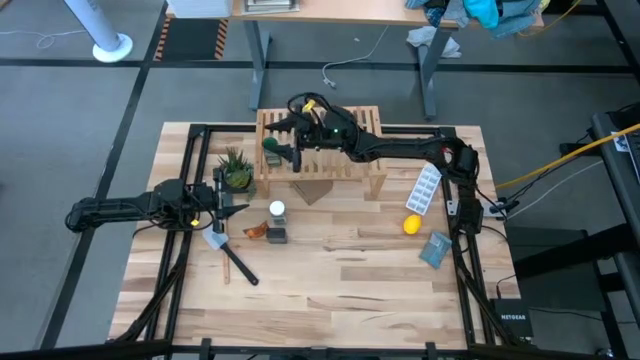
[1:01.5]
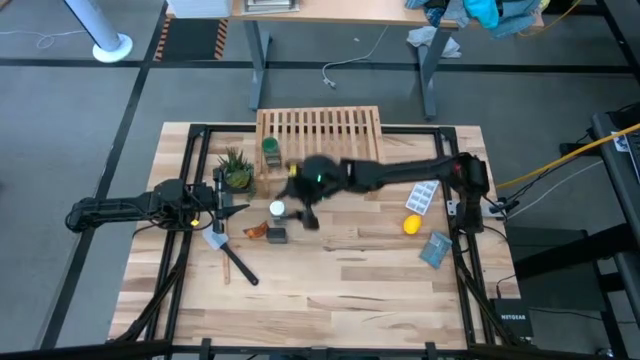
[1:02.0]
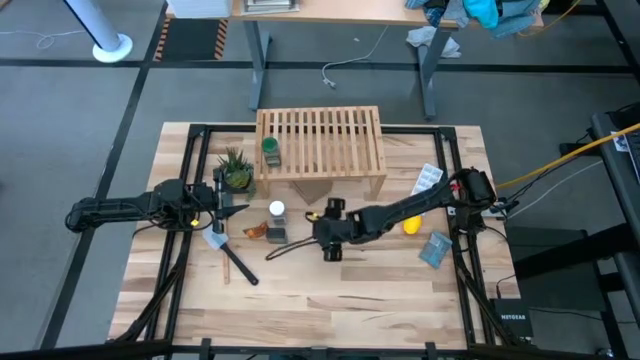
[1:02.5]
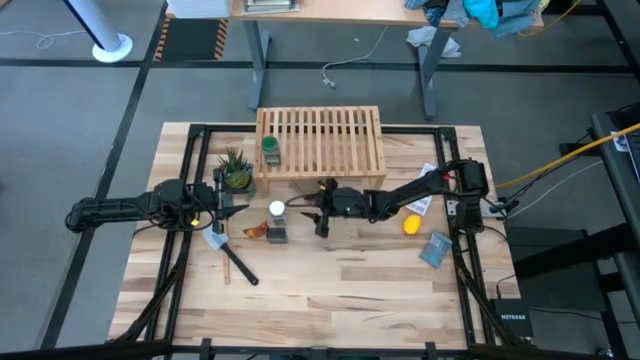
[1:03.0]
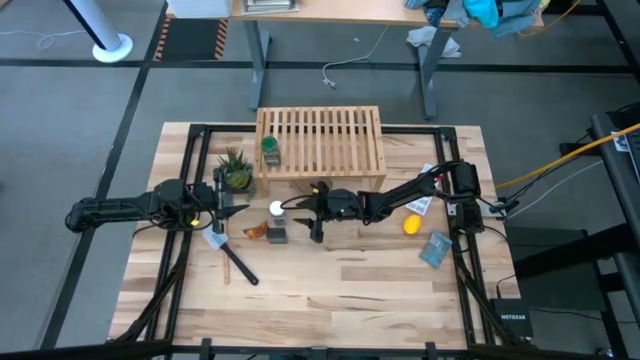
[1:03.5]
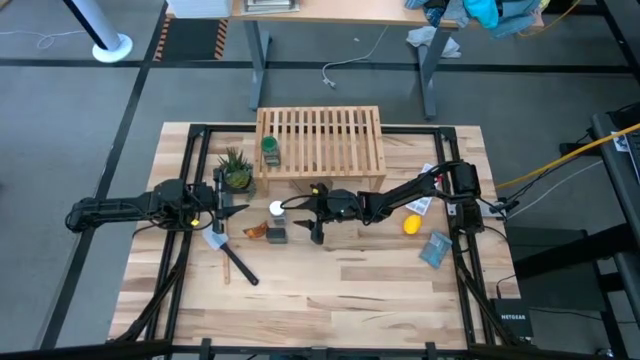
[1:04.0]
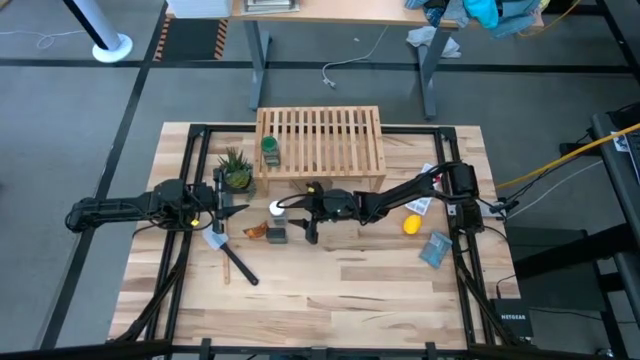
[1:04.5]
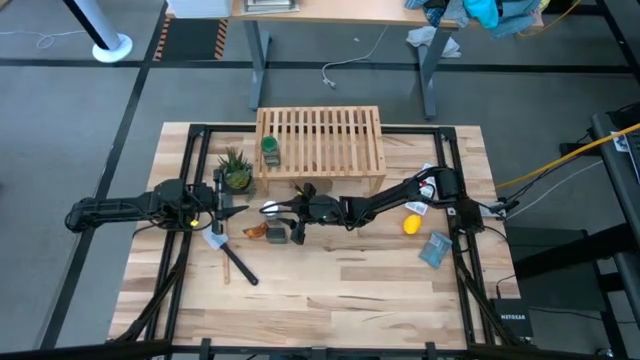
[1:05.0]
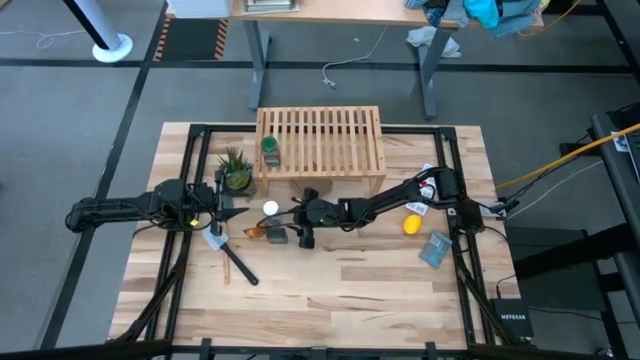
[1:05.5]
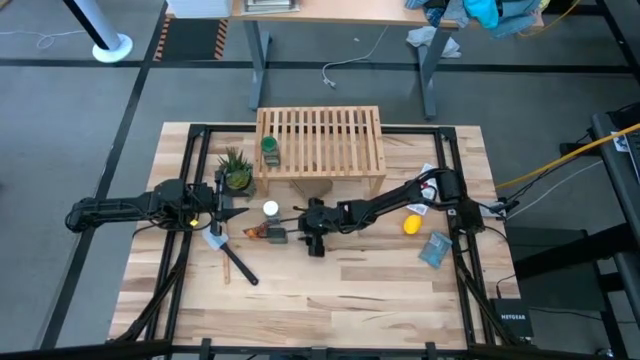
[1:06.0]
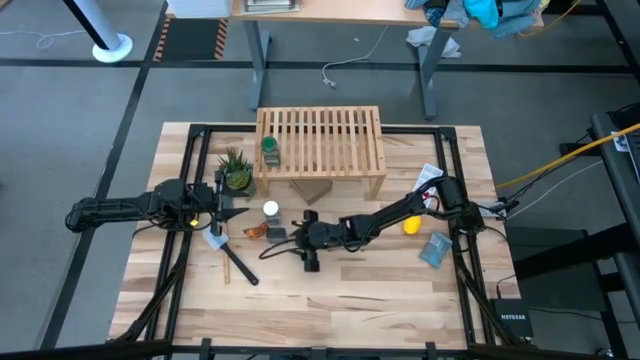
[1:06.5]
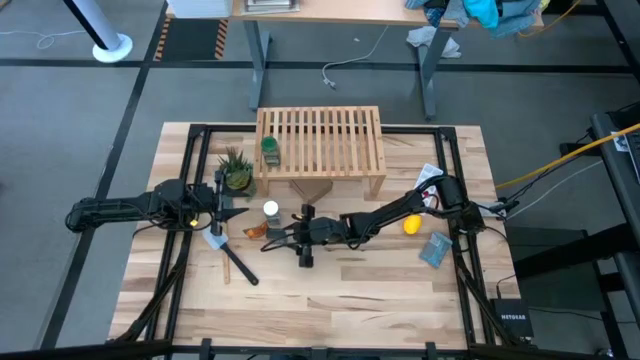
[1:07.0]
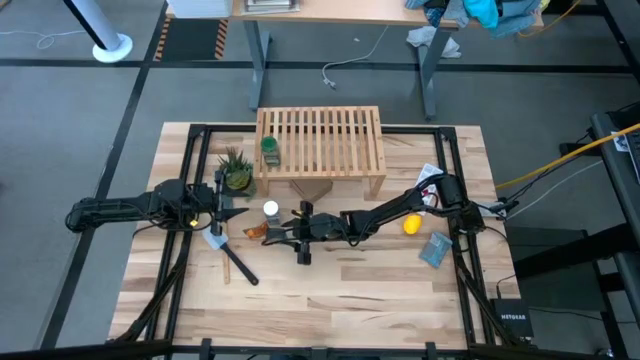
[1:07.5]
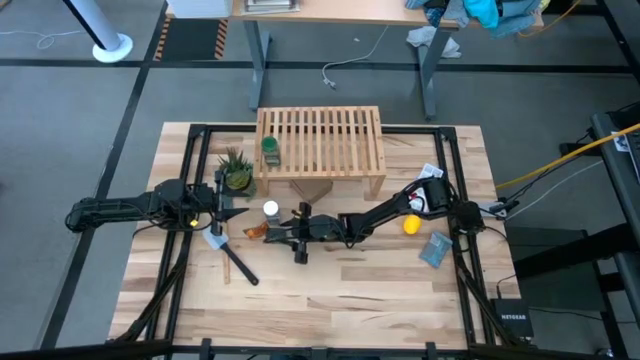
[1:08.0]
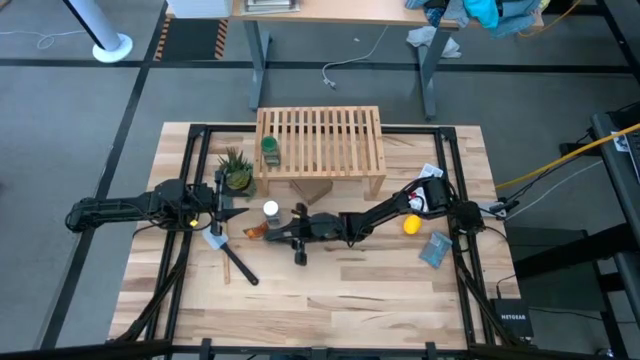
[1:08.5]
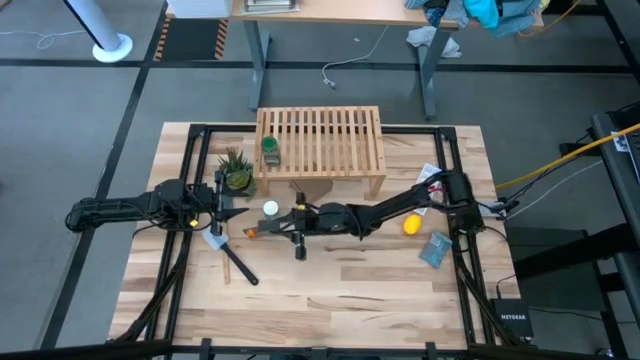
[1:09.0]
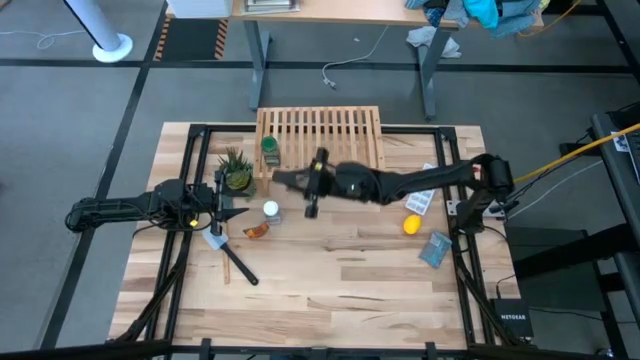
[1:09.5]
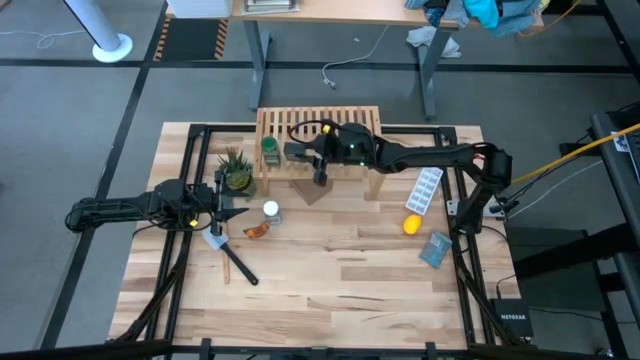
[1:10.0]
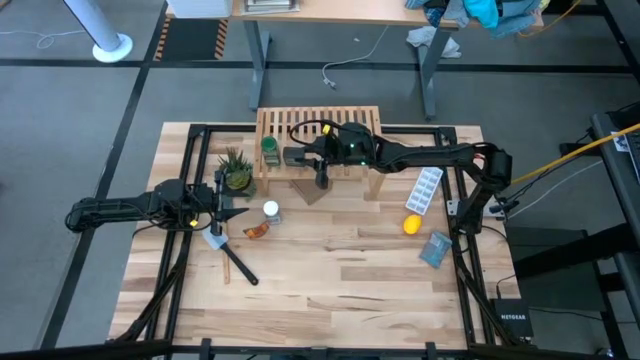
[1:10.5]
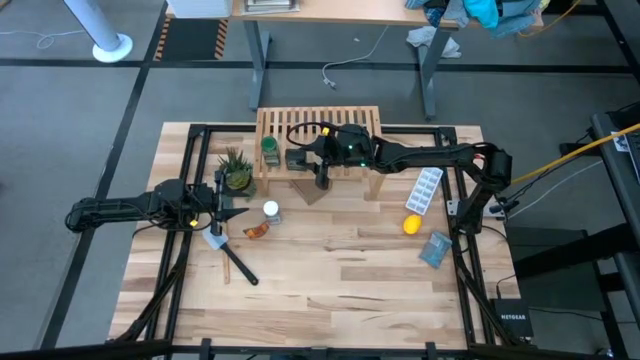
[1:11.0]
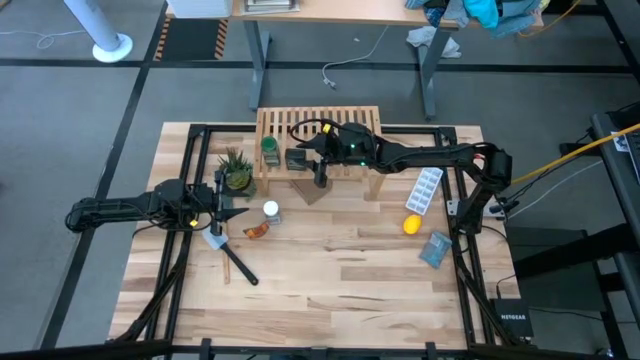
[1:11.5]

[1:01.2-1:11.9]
Task: Shelf spices
Put the black seasoning can on the shelf

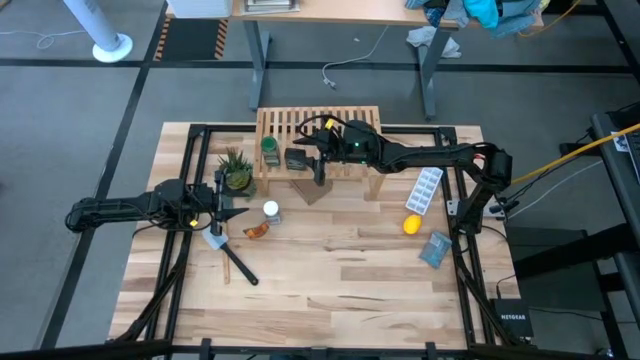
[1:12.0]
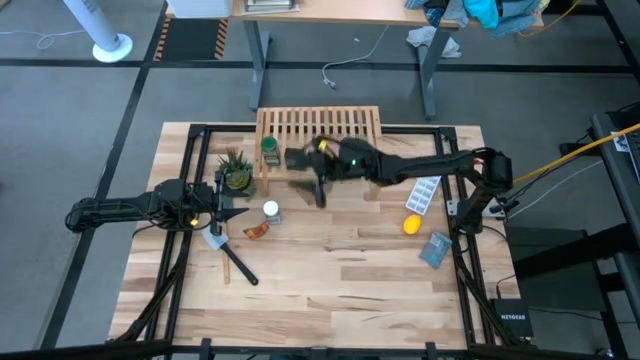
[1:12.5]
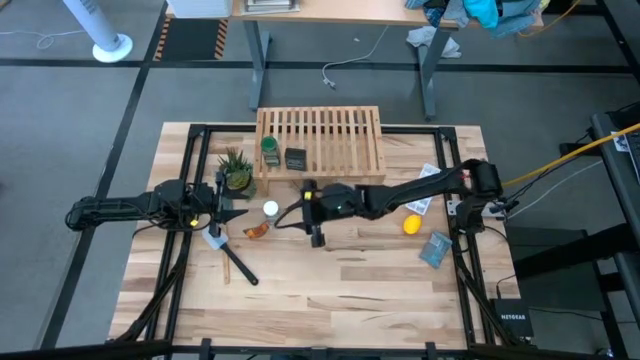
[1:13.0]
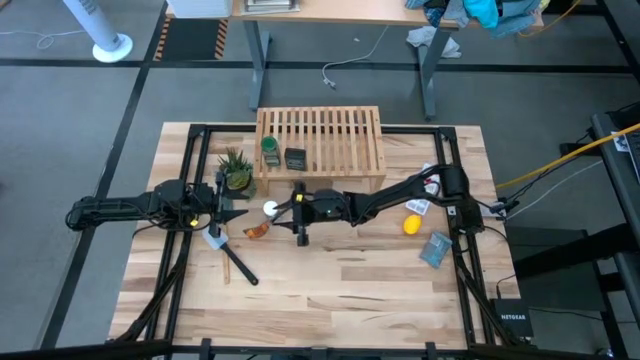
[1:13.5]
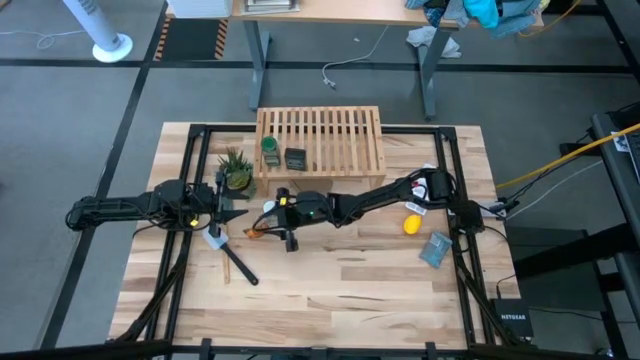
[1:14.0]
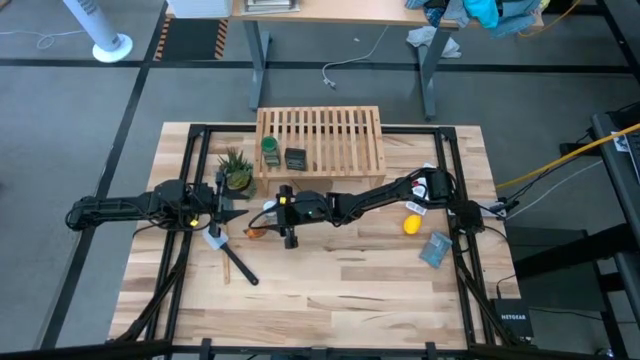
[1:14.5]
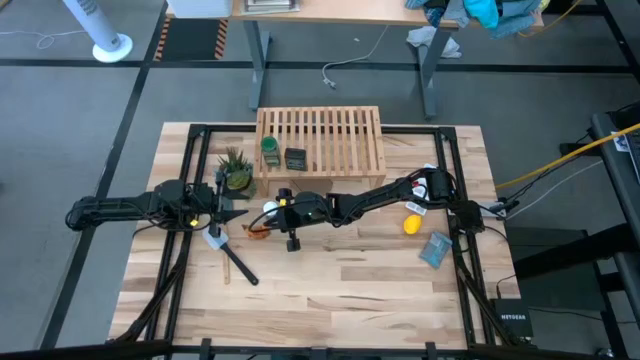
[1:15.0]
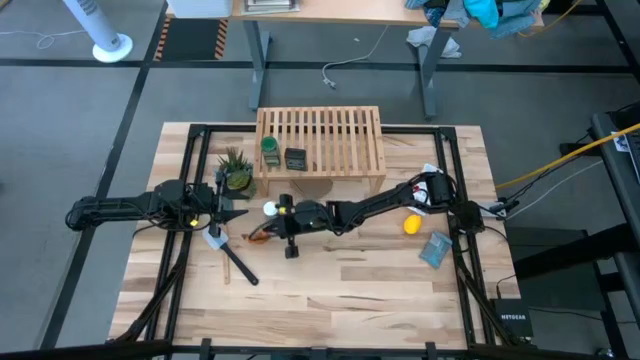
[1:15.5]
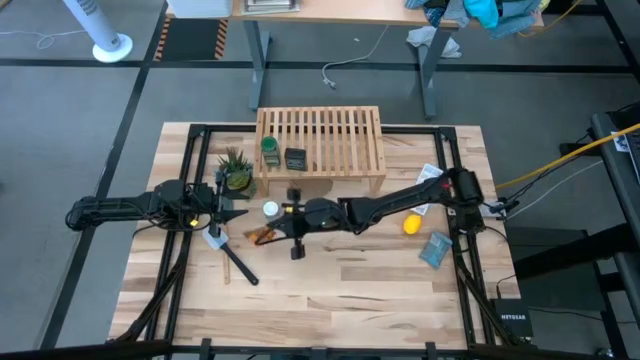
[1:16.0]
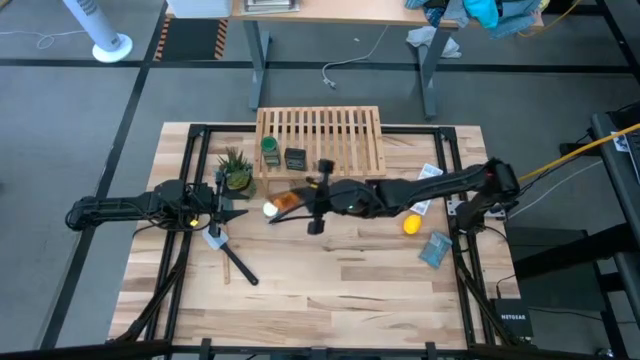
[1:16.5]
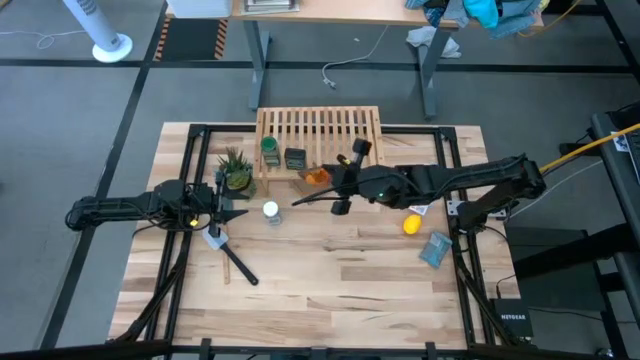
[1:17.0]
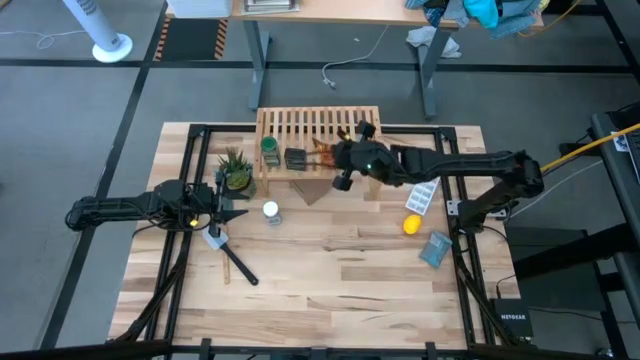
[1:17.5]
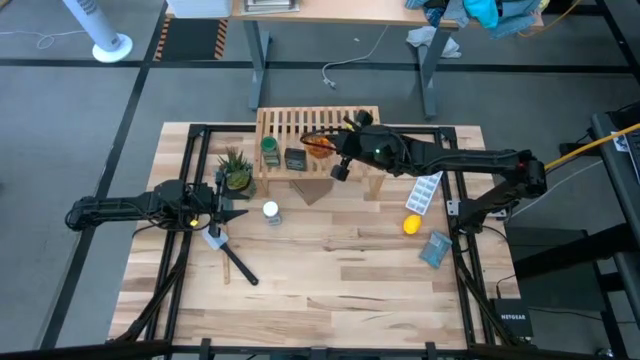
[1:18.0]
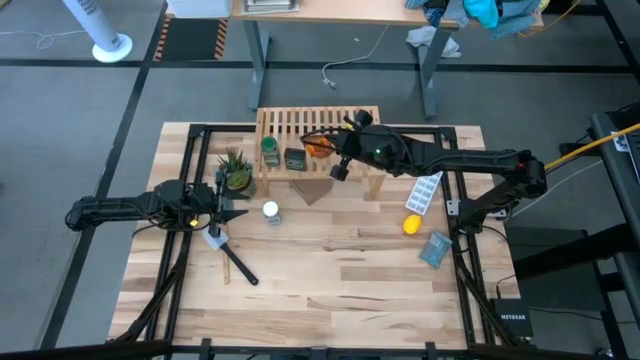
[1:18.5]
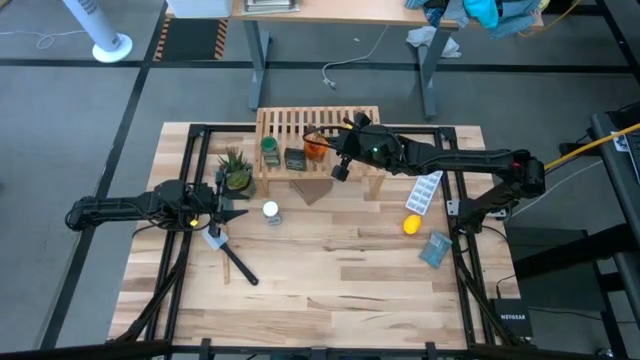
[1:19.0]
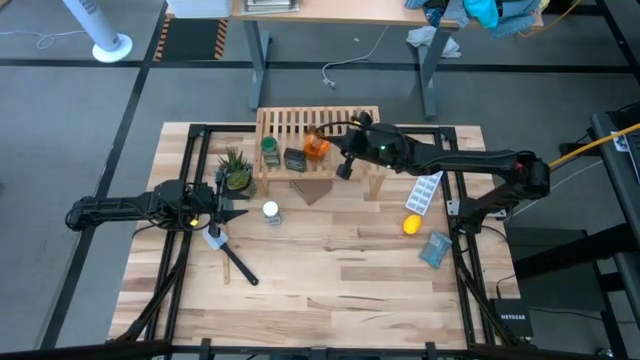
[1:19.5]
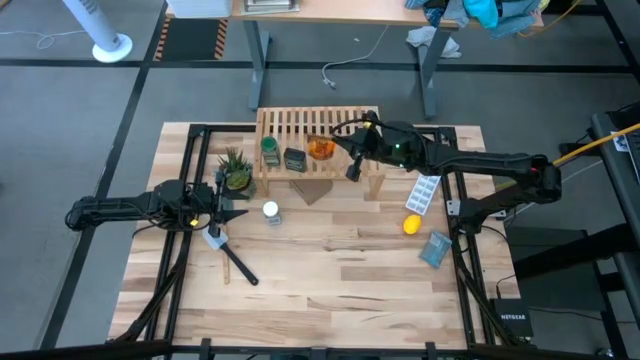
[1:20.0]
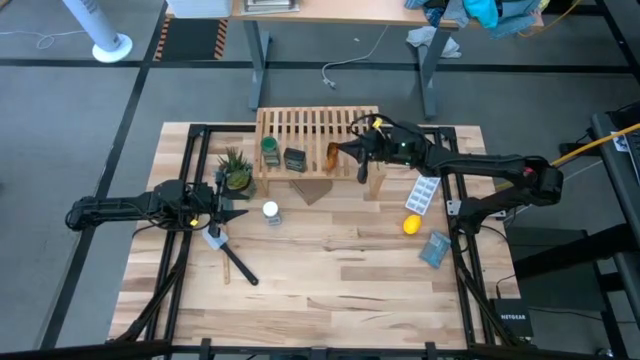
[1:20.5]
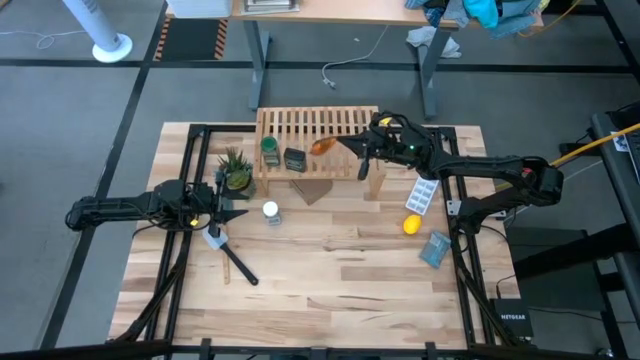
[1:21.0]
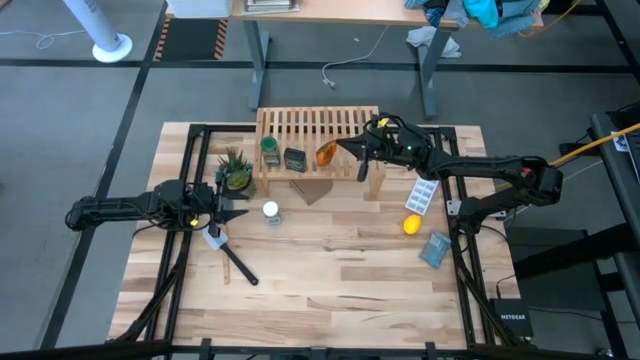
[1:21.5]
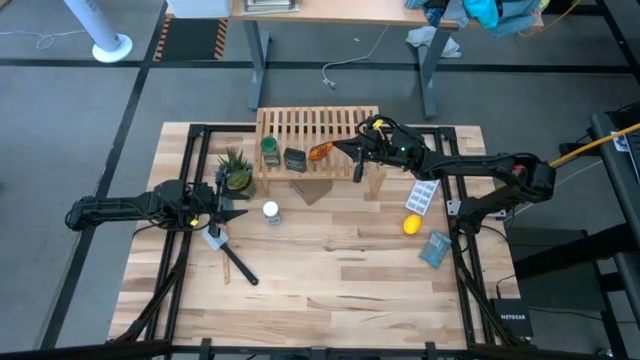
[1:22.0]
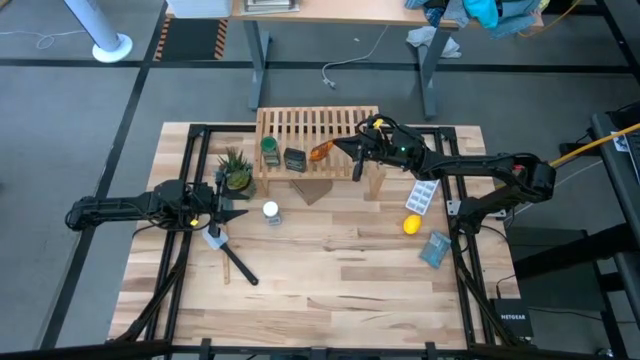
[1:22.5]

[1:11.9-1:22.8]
Put the orange seasoning bag on the shelf
